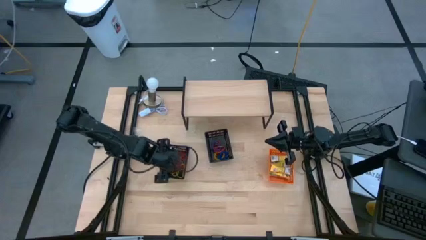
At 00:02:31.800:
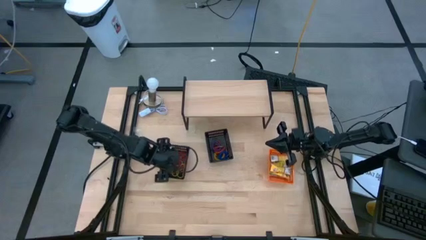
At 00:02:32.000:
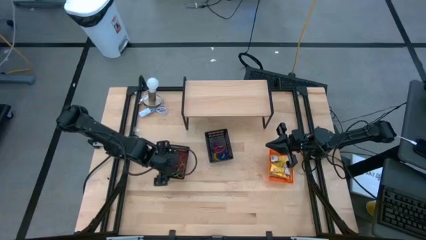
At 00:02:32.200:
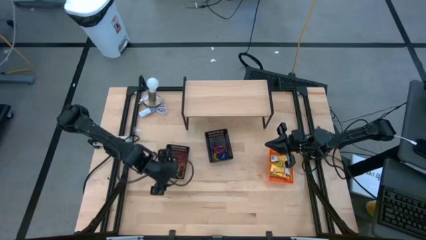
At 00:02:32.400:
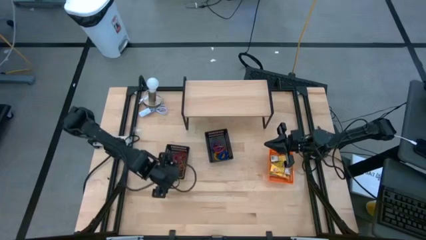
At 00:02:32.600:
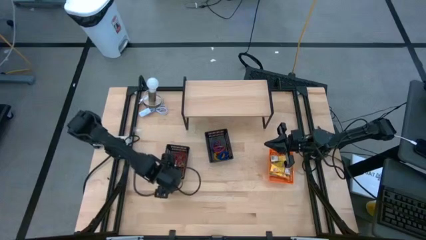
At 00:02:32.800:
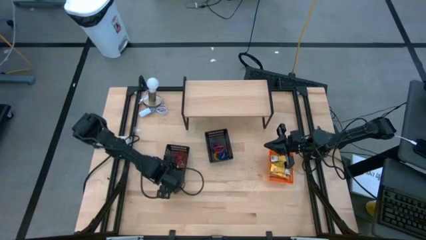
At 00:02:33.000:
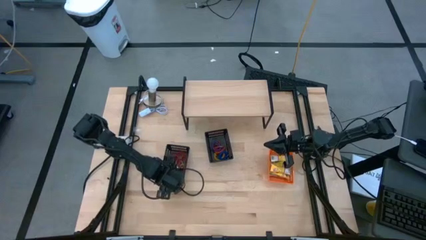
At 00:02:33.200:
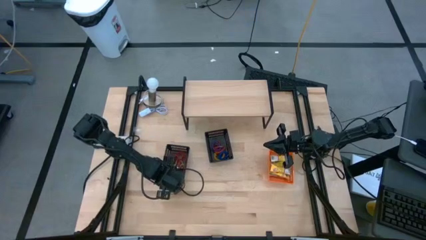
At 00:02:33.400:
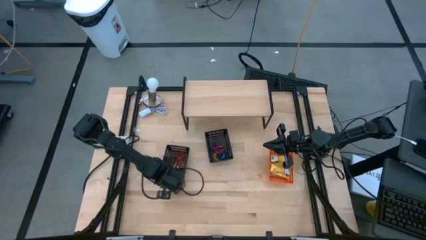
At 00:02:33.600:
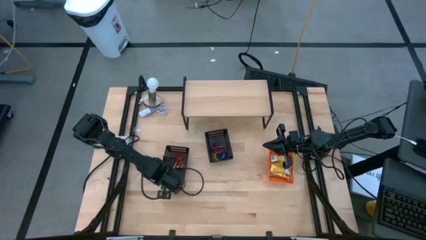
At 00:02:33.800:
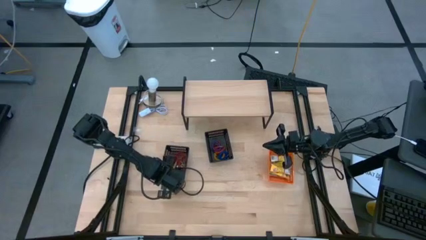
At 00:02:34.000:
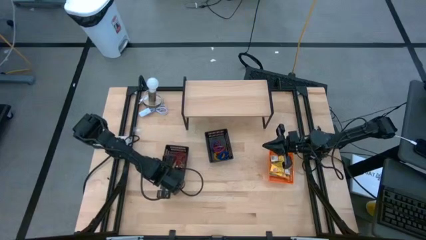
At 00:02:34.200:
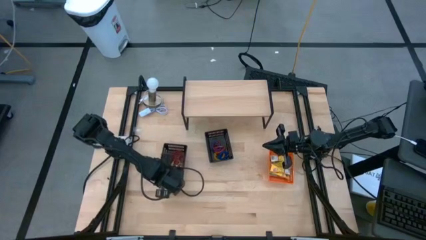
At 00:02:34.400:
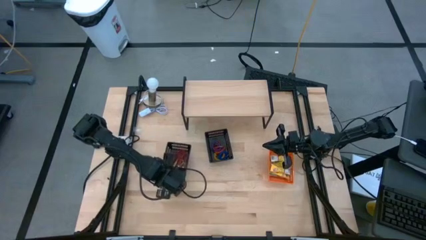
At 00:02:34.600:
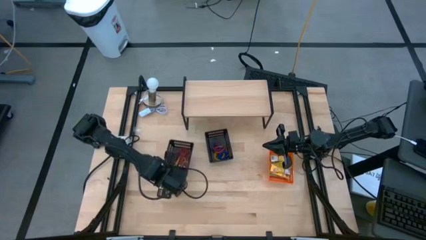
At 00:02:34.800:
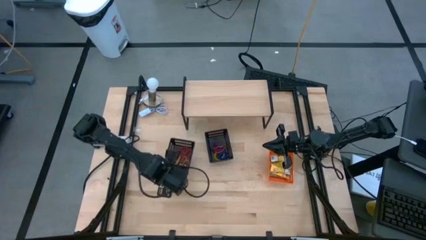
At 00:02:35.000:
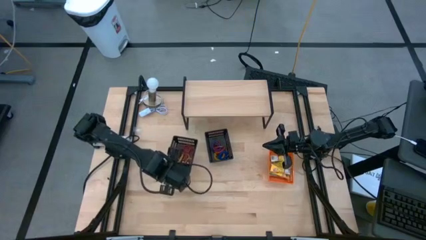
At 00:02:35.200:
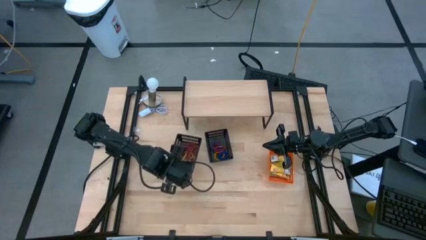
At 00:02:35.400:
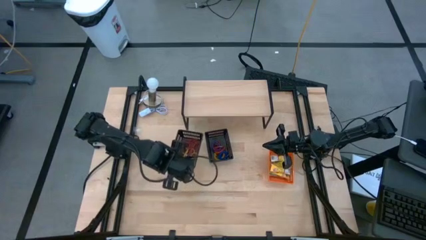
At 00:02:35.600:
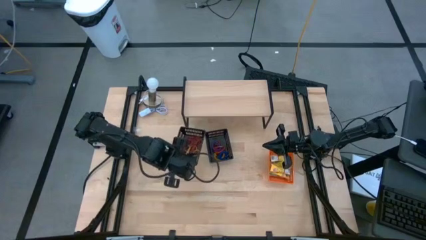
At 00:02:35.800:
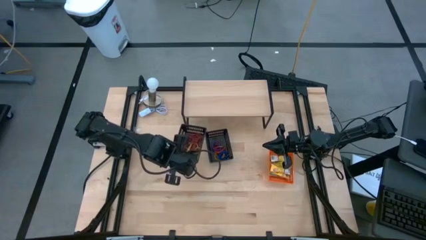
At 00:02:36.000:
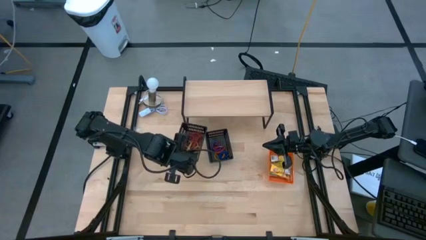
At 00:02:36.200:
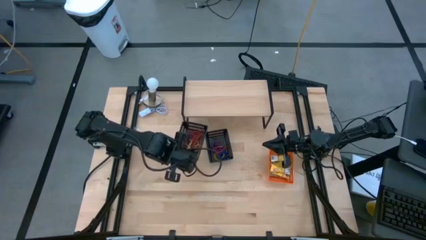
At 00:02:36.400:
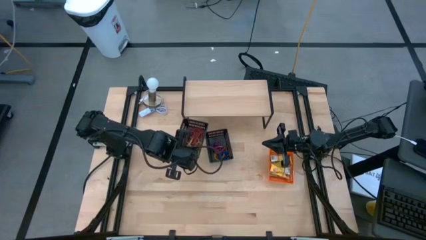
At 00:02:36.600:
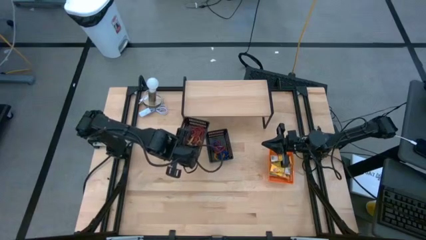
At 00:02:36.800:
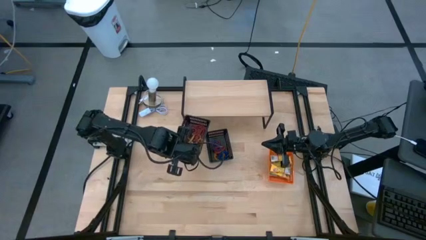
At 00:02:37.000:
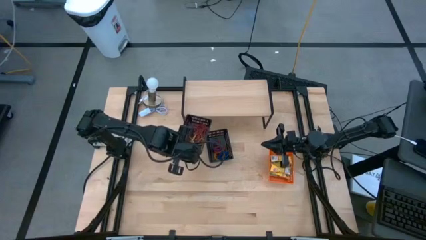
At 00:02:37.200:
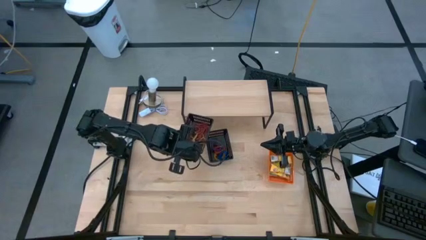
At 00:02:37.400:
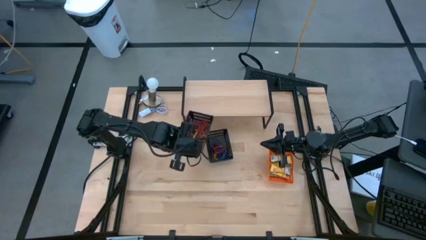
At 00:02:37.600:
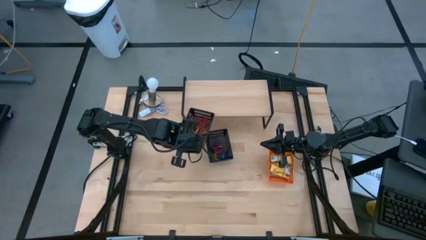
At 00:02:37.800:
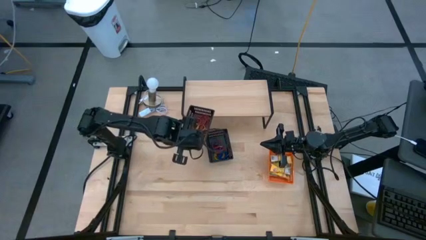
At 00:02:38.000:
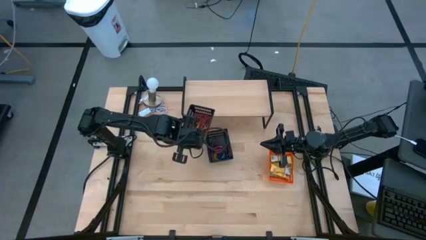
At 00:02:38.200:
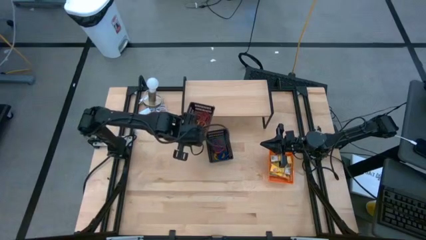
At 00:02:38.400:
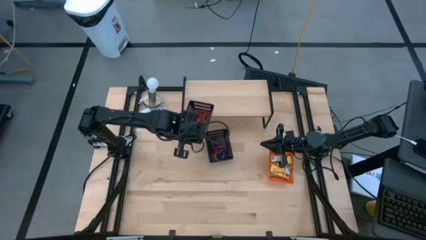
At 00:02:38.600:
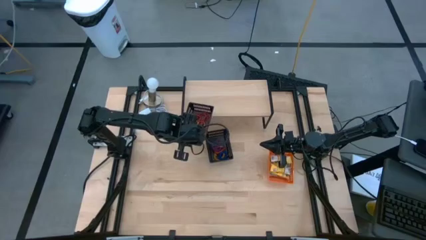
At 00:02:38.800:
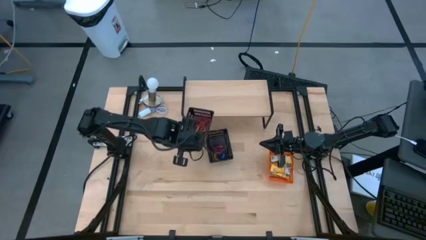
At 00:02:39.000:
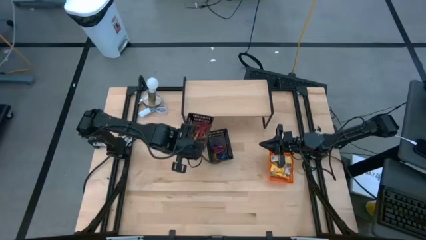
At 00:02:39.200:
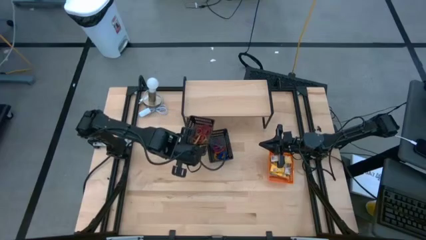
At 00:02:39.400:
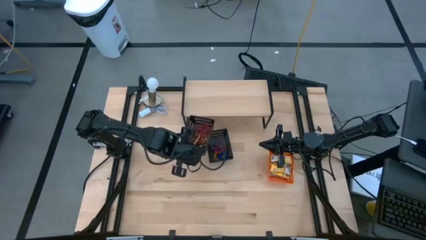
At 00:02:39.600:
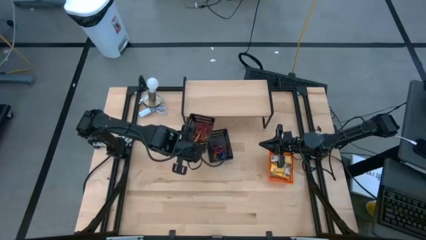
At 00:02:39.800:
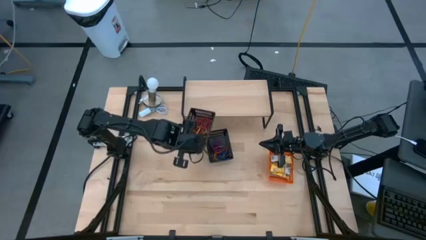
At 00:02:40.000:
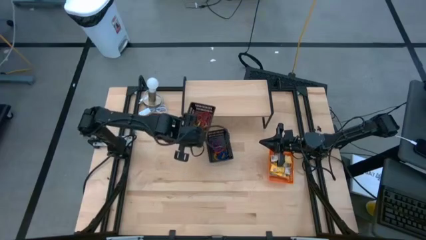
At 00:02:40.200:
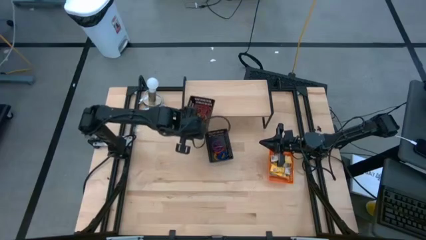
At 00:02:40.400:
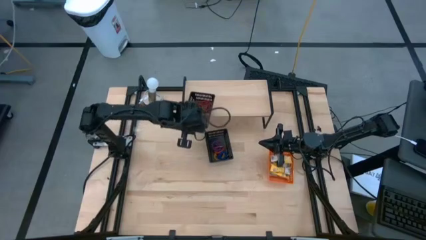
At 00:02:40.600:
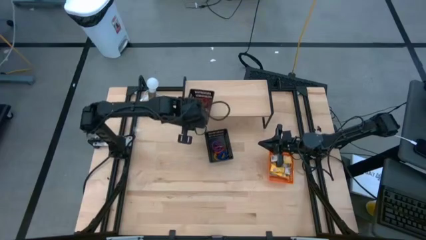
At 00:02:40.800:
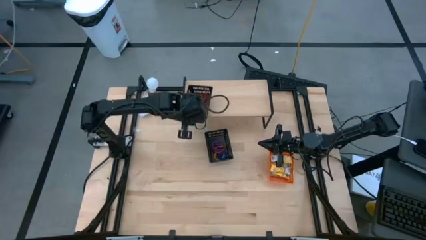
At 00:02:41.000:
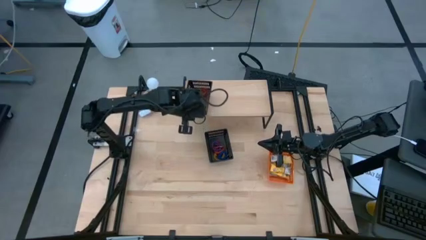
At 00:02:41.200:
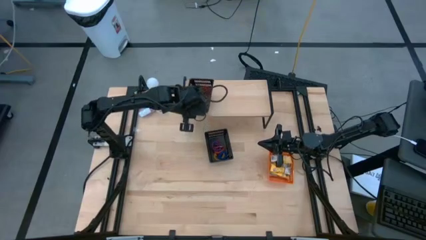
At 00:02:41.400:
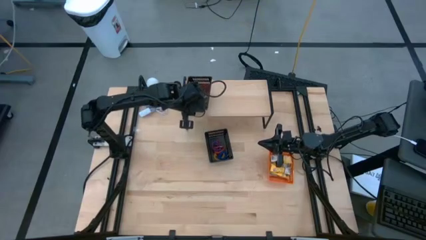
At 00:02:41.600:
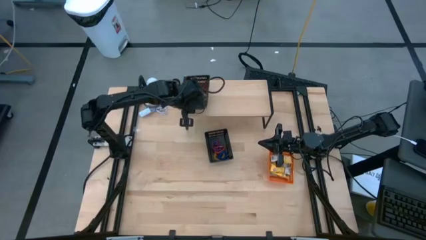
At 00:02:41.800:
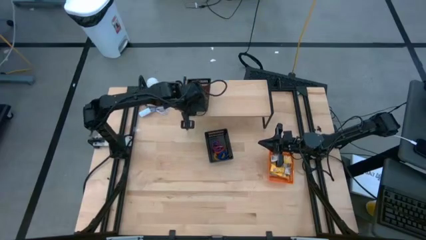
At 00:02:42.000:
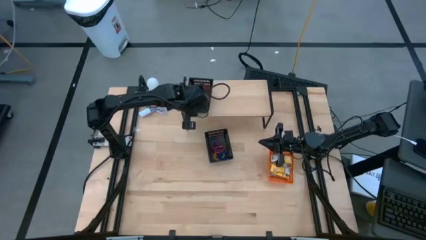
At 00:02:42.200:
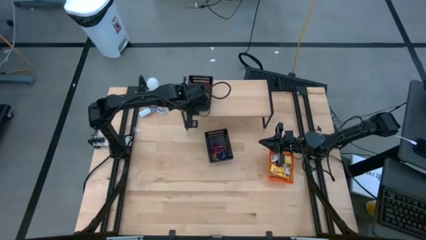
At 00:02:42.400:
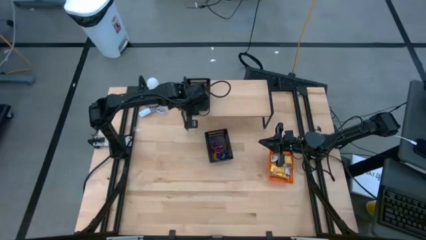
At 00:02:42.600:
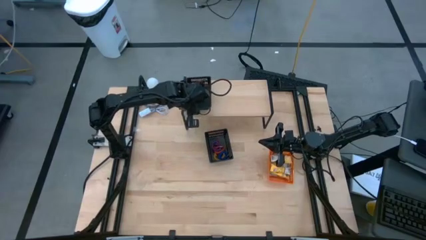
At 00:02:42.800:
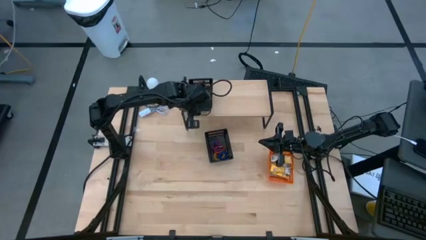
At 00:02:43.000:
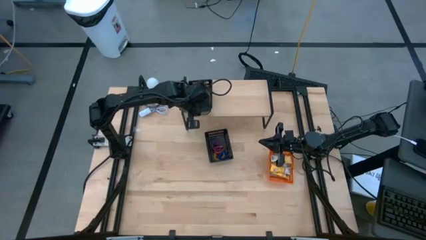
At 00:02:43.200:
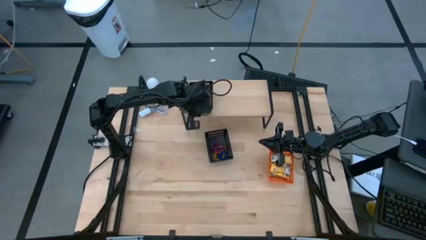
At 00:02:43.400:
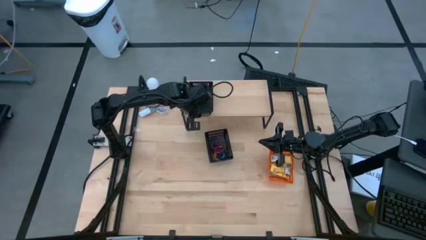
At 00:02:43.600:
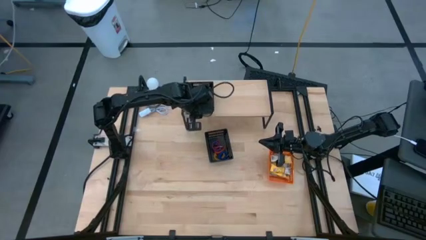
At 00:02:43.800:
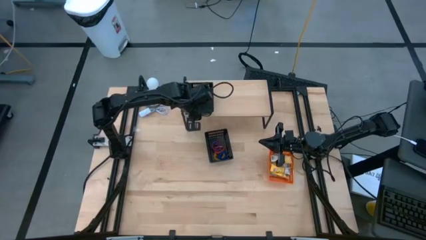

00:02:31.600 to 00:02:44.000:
Task: Pick & Place Office Desk Supplies
Put the left black bin on the shelf

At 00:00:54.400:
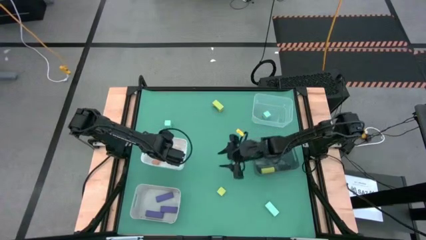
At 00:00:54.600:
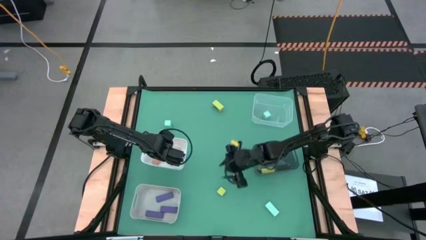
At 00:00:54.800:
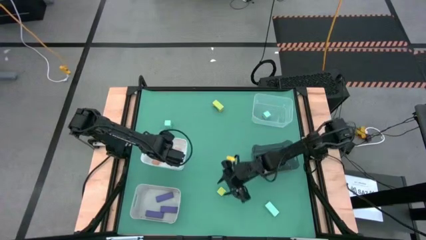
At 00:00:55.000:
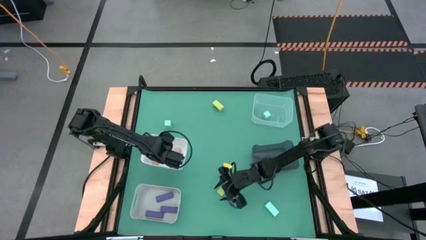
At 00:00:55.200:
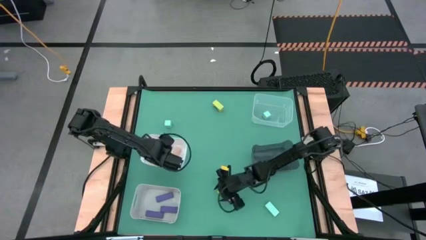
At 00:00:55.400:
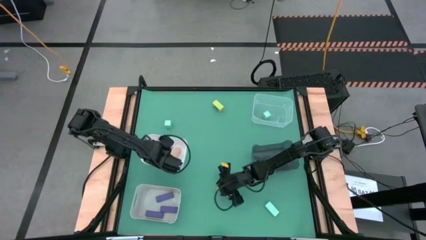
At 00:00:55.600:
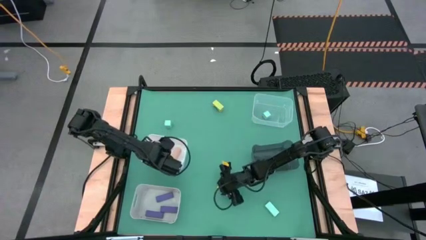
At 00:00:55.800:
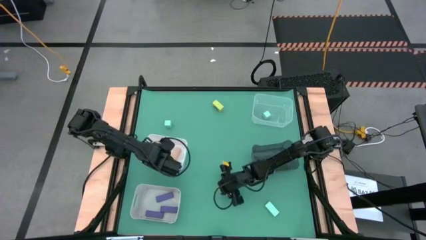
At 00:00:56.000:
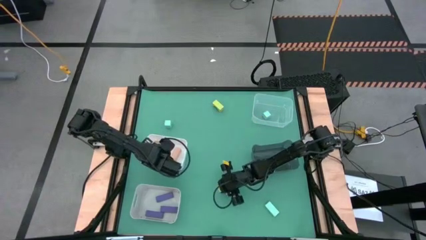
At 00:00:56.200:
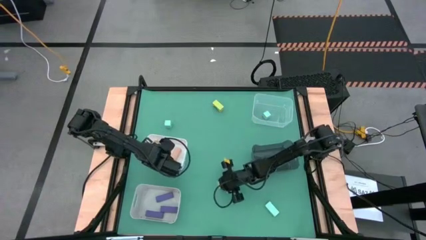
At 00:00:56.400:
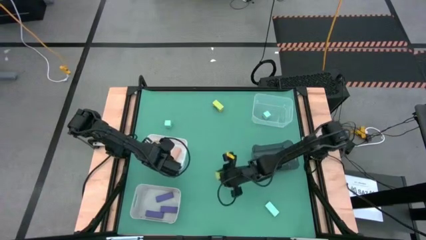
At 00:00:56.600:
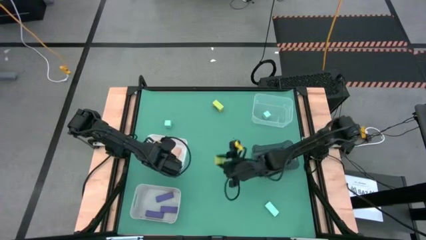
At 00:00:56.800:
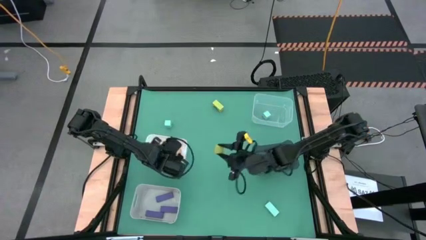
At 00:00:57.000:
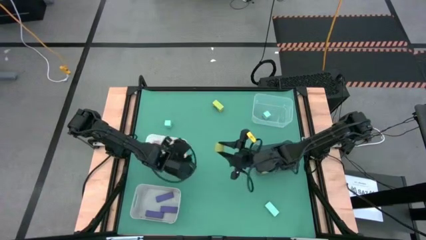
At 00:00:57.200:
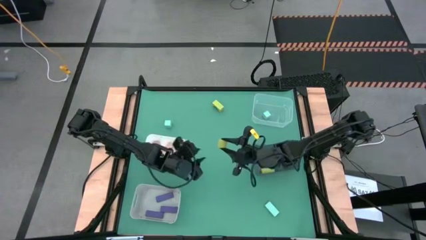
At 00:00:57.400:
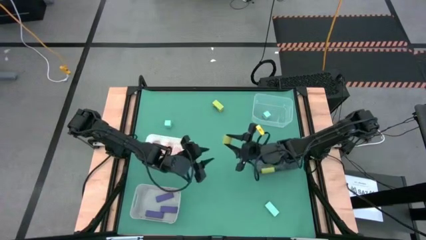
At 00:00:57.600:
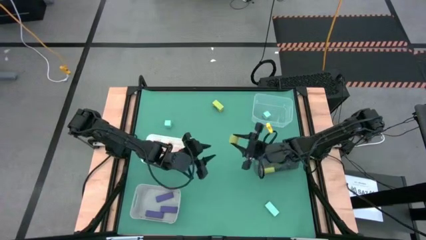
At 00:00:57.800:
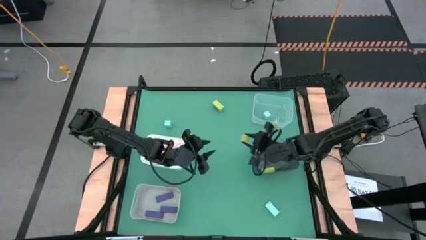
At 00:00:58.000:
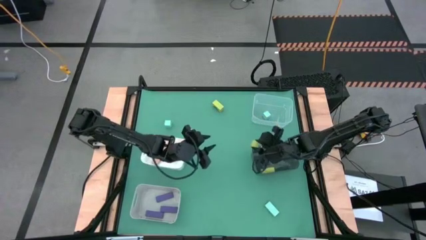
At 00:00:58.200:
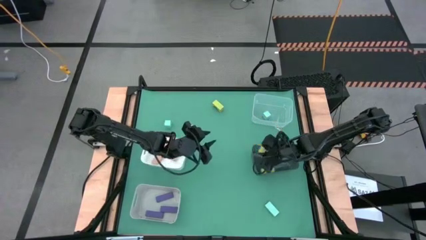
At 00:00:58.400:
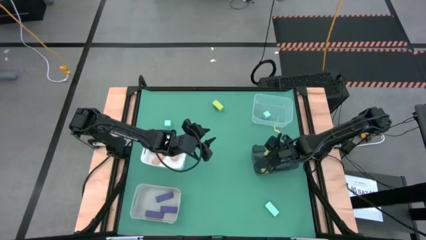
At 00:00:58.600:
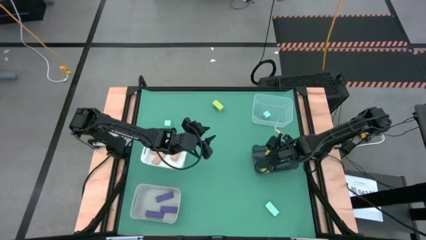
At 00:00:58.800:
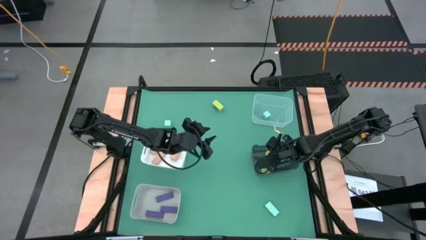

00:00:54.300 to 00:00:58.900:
Task: Sort & place blocks by color
Put the bottom green block into the black bin
